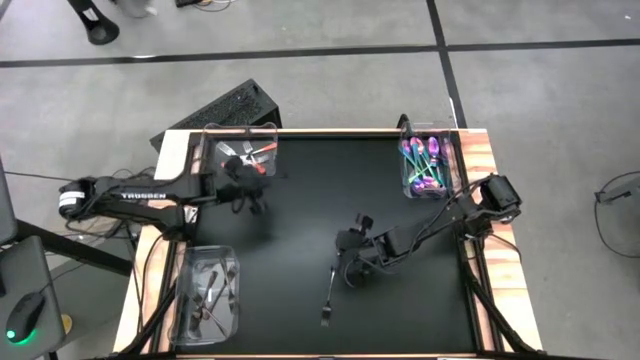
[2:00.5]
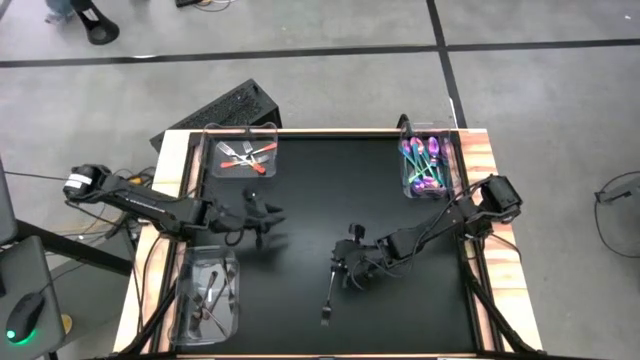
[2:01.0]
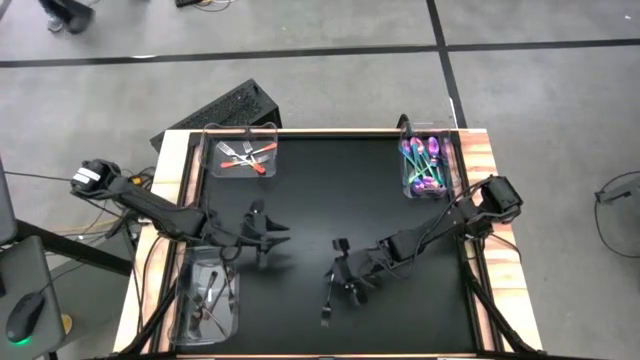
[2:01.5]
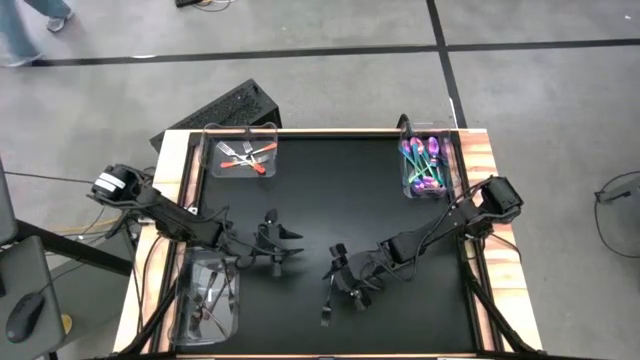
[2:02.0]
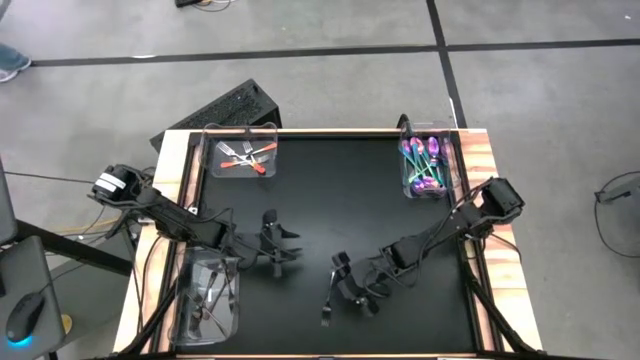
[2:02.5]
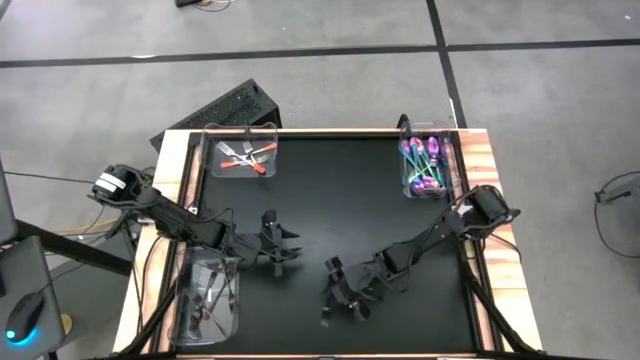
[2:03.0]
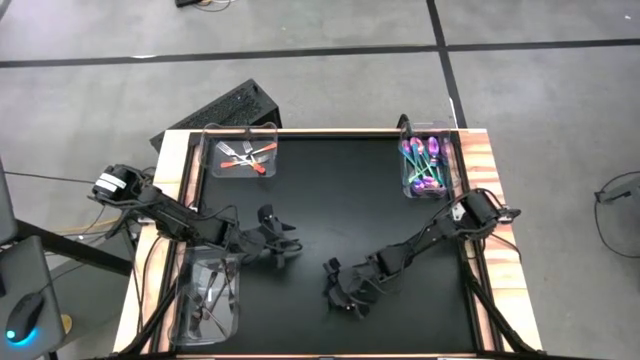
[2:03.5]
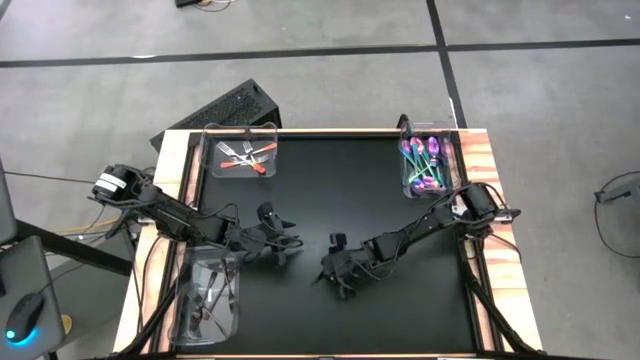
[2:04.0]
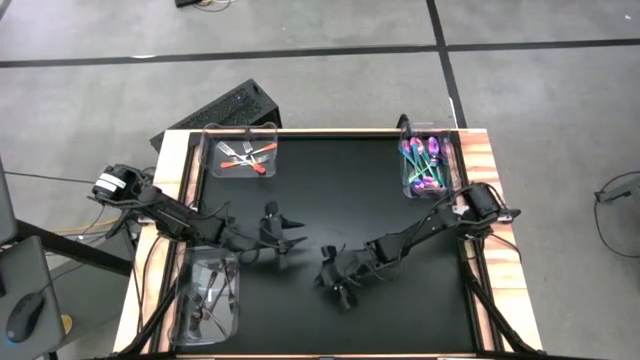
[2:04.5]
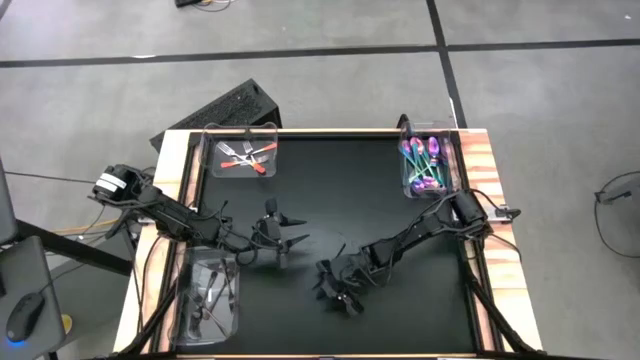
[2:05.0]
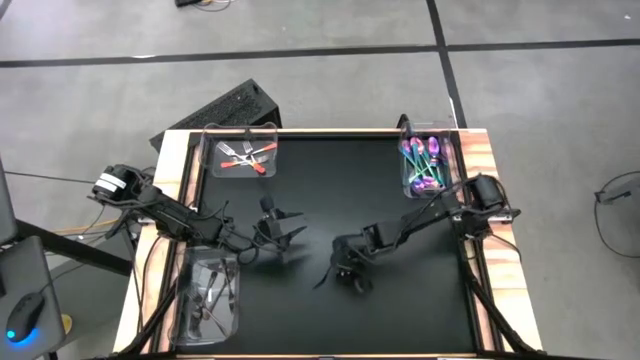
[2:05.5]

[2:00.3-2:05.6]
Task: Sort silverware by color (type)
Put the black fork into the bottom transparent bin

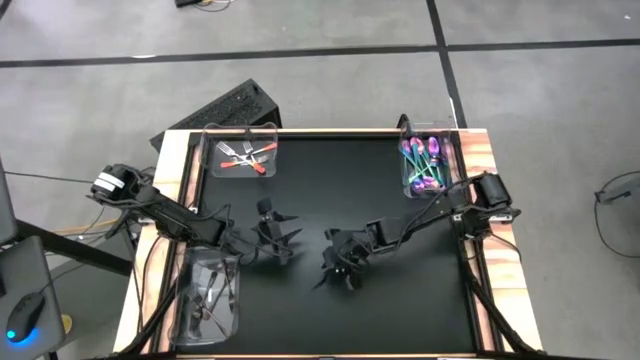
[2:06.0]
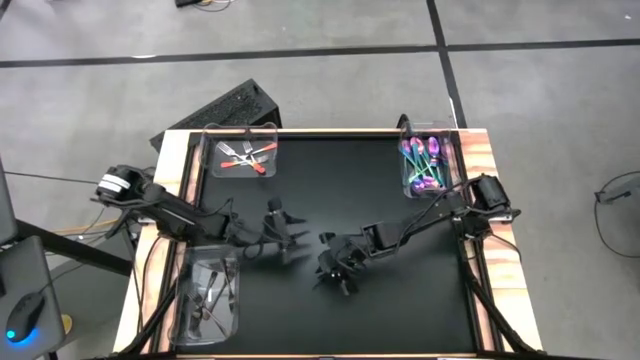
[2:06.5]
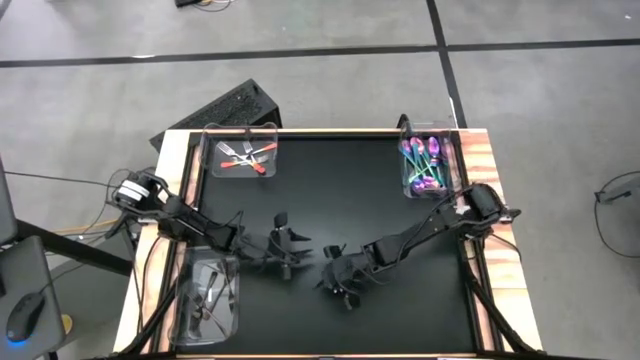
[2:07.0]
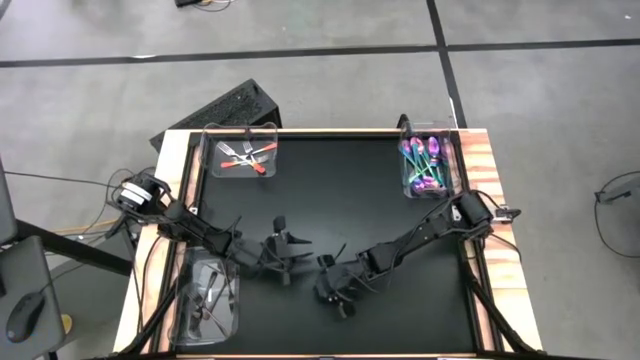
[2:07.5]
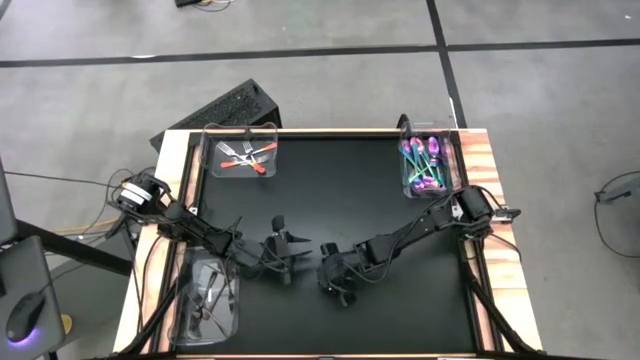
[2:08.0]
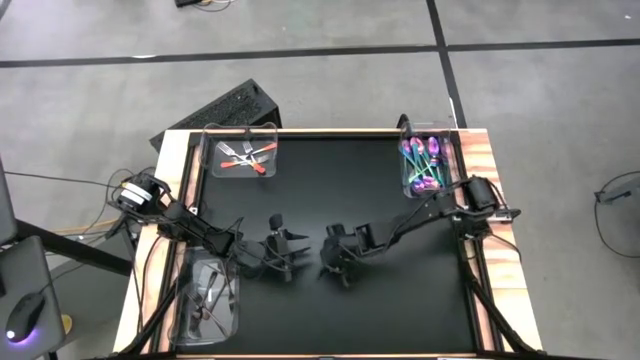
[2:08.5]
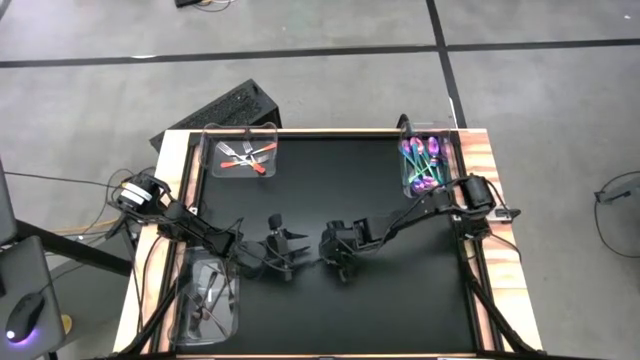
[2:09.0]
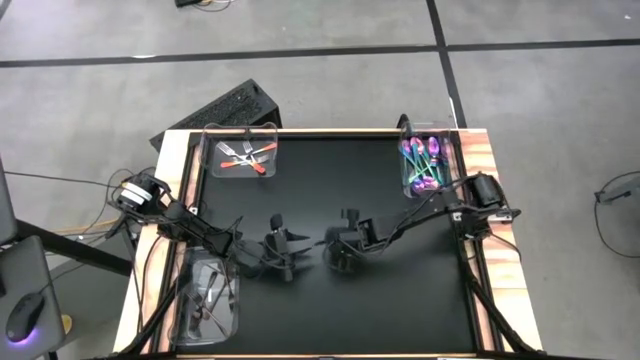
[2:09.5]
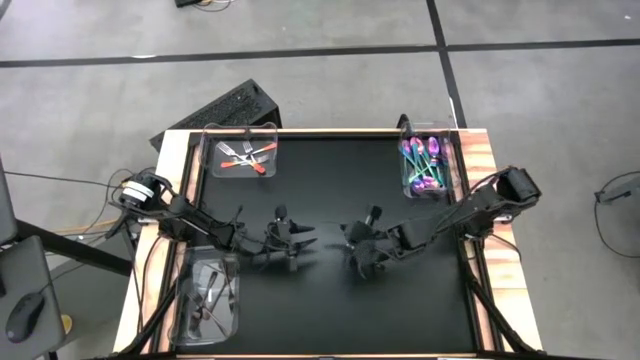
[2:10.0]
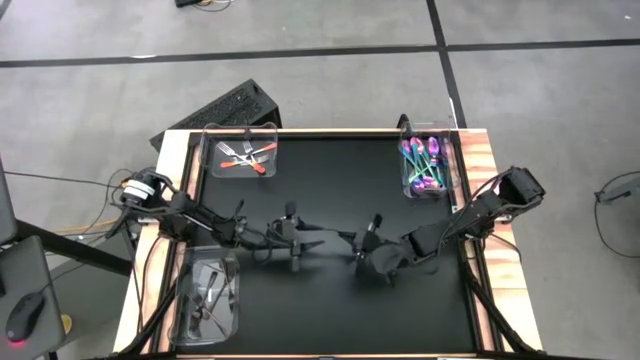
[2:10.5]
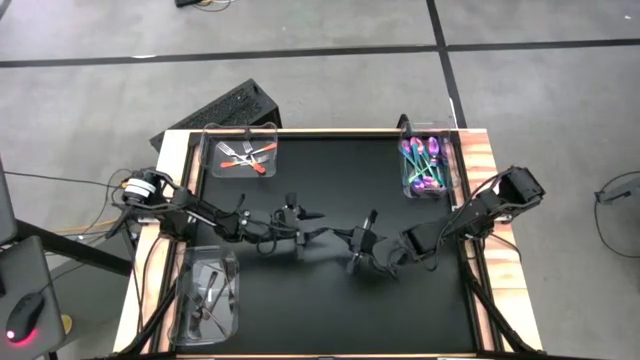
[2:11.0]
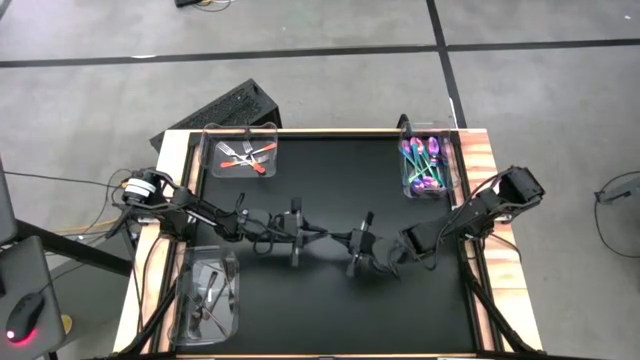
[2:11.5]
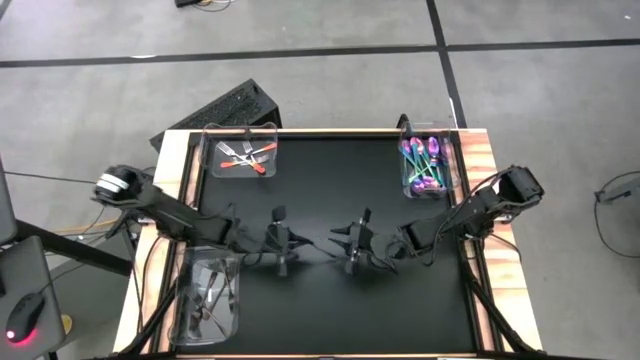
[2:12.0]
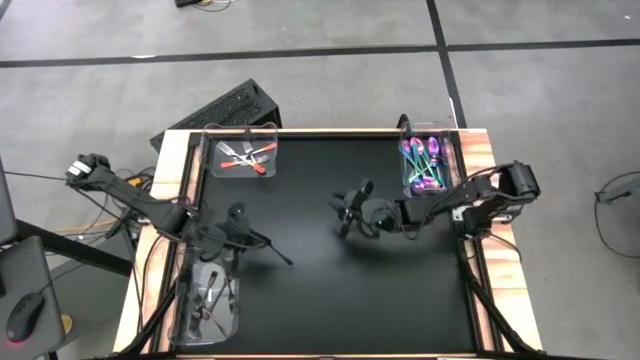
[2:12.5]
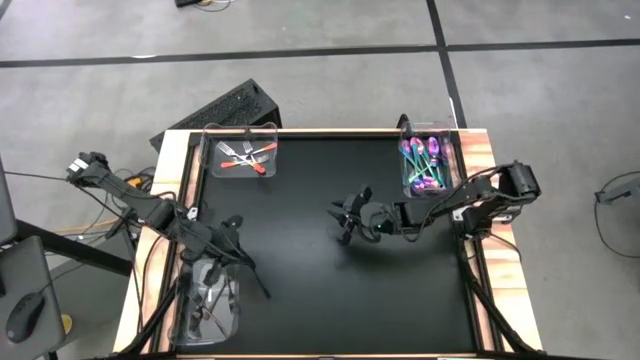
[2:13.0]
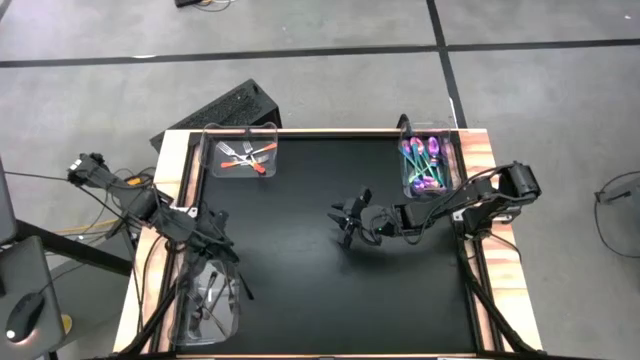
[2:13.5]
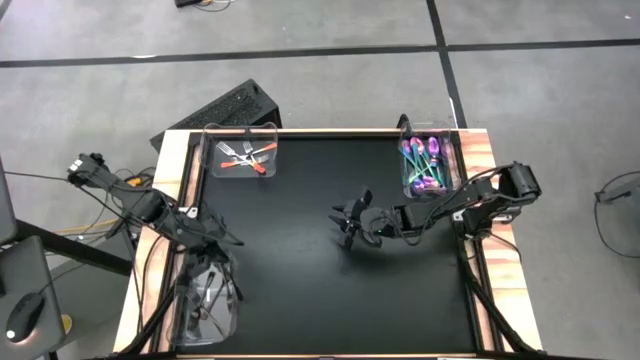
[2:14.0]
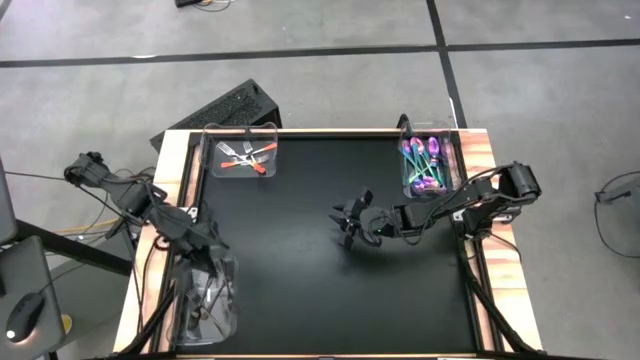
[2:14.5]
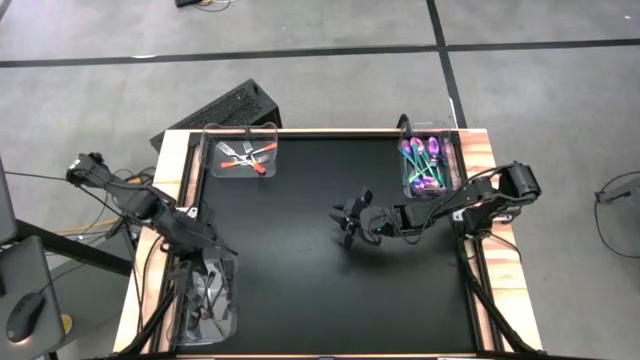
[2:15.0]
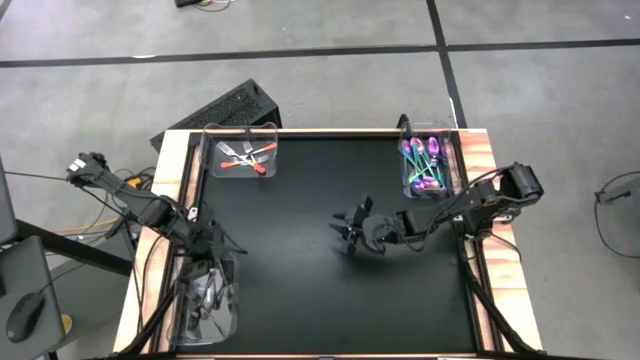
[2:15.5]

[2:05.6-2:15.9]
Put the black fork into the bottom transparent bin

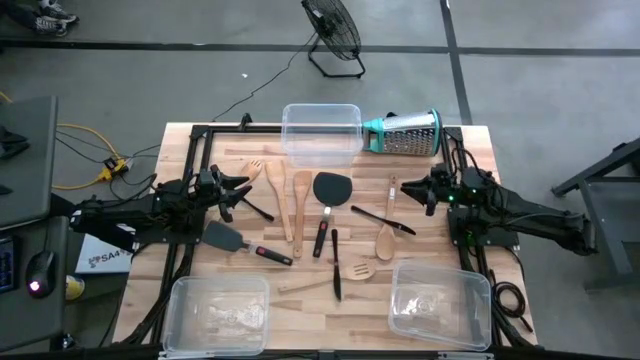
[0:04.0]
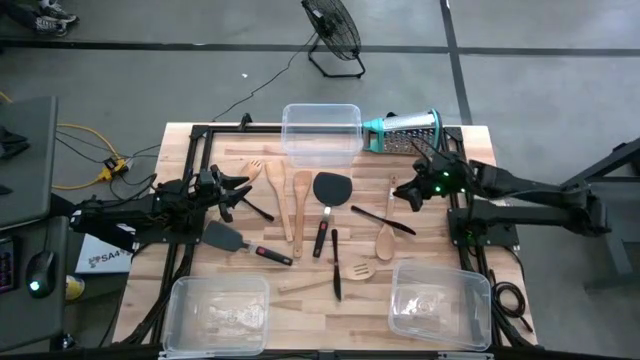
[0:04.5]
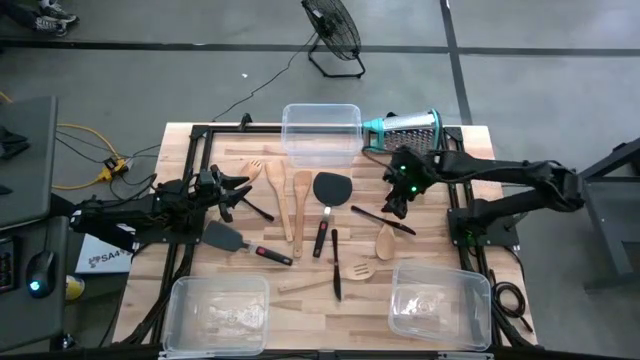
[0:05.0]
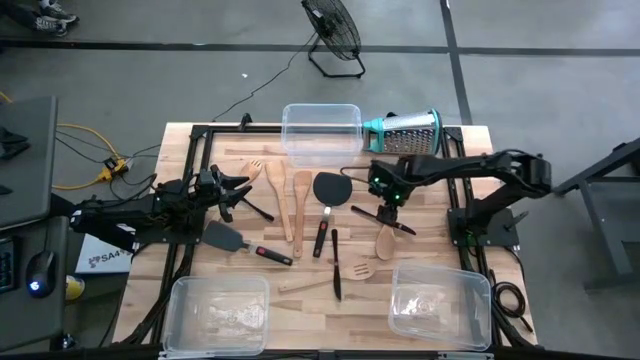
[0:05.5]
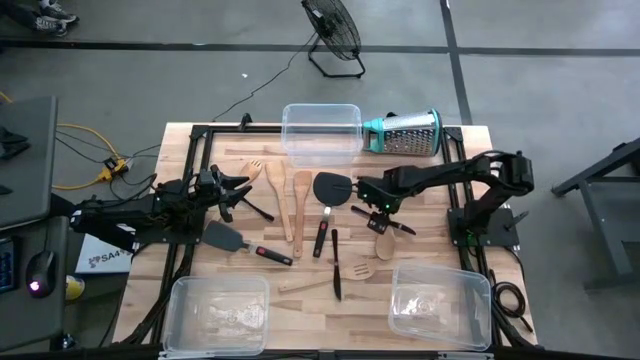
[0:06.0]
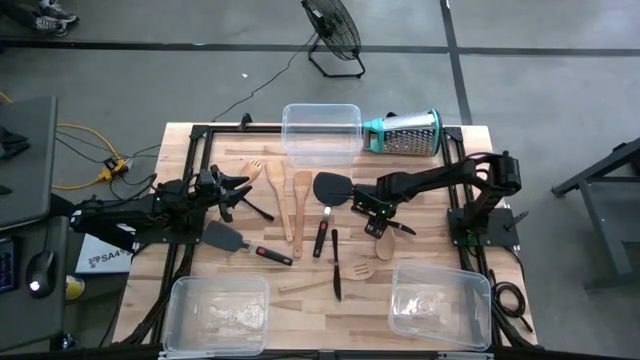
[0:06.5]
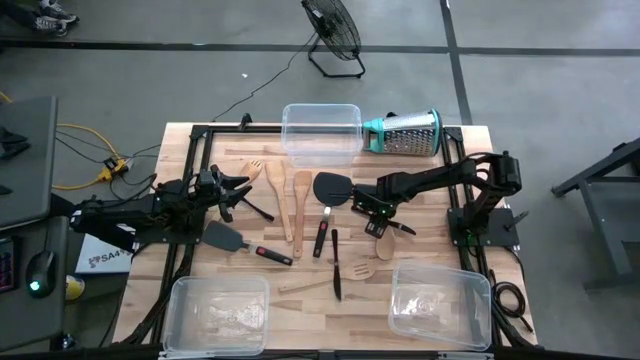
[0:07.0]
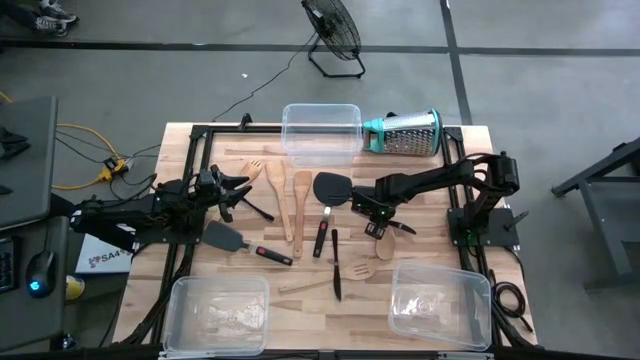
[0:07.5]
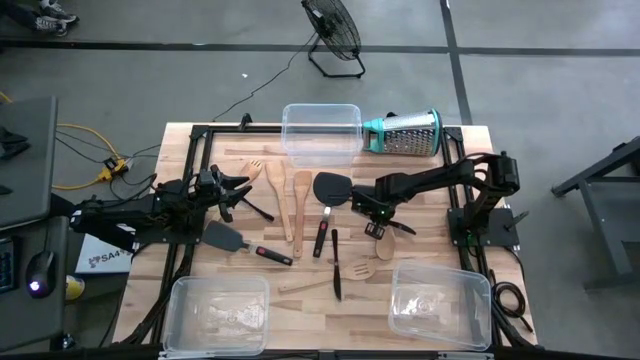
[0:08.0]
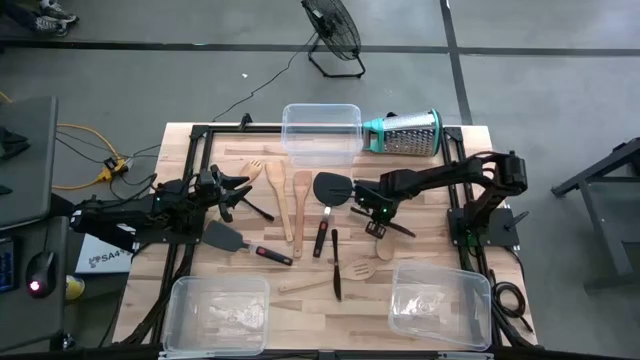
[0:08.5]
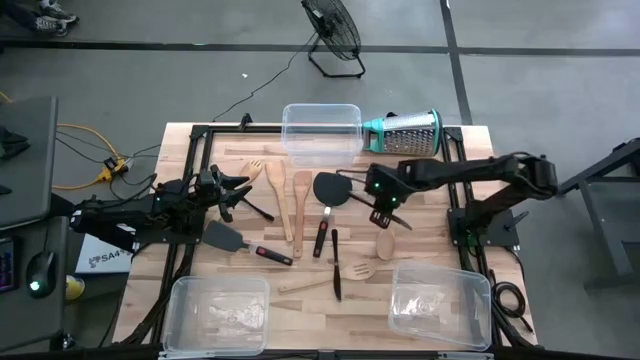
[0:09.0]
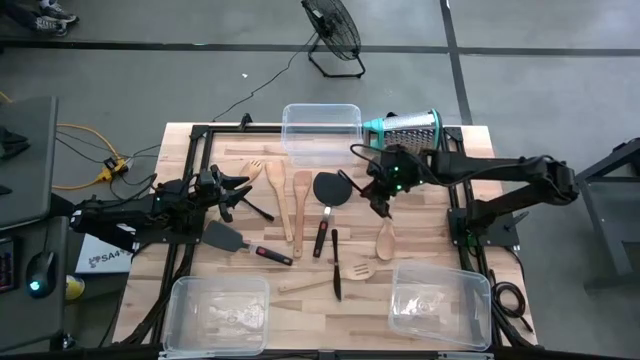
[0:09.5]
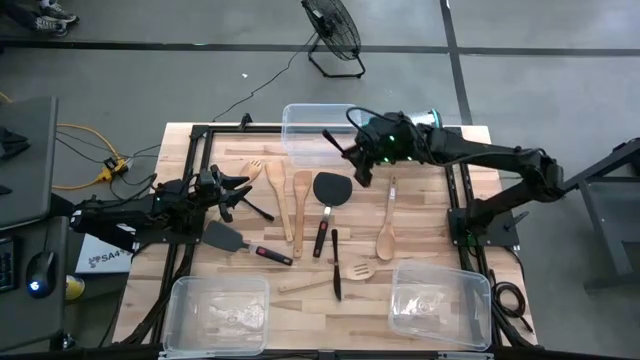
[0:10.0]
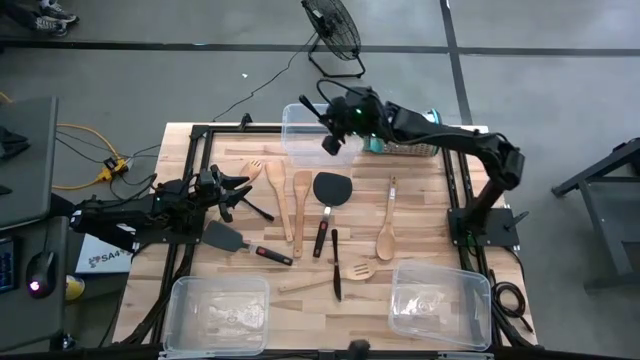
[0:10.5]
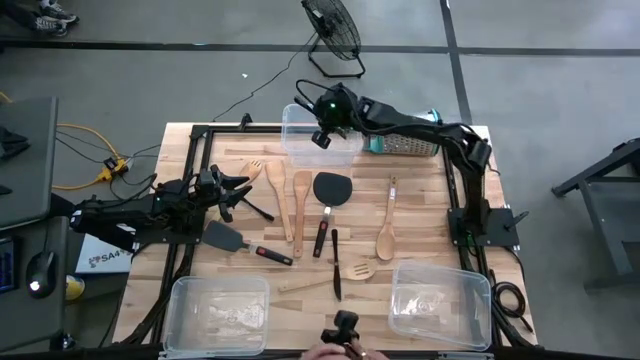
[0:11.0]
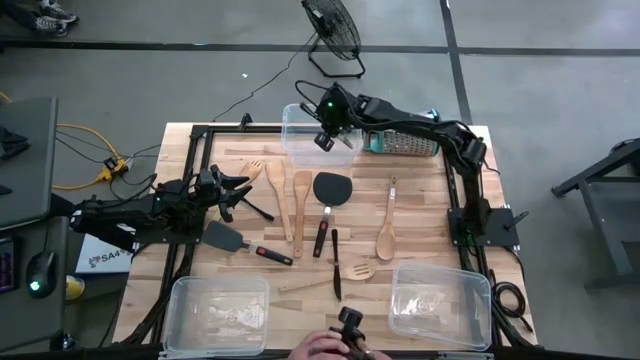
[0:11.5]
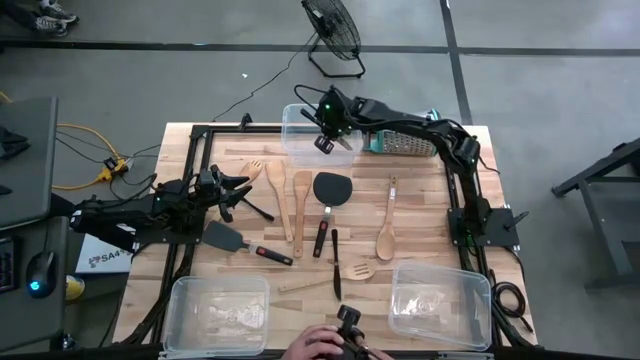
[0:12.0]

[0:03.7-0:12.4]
Task: Pick & Place Kitchen Items
Put the black table knife into the top transparent bin
